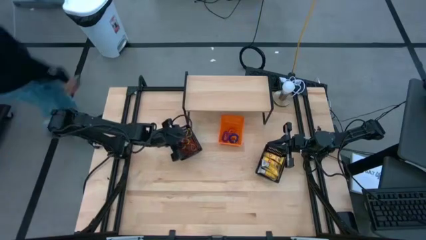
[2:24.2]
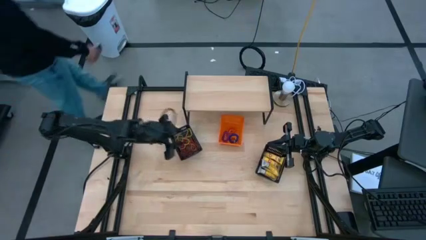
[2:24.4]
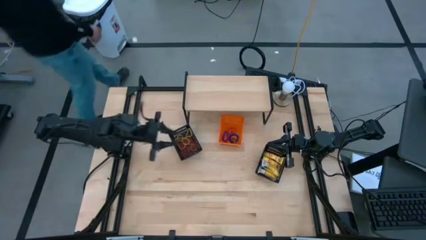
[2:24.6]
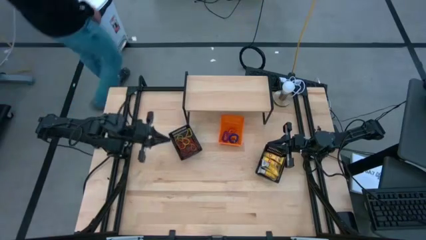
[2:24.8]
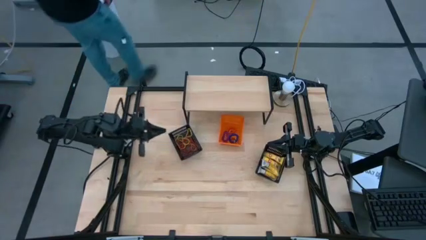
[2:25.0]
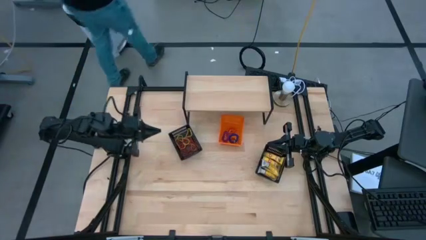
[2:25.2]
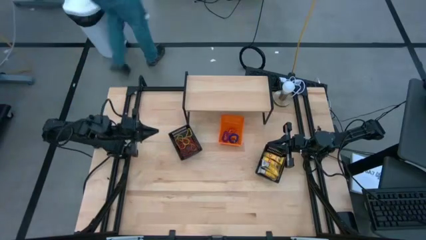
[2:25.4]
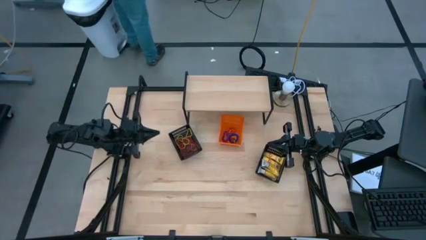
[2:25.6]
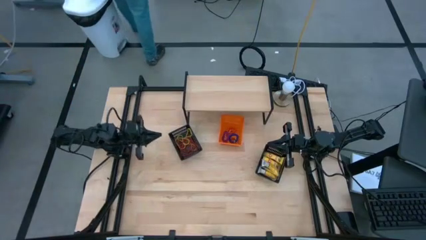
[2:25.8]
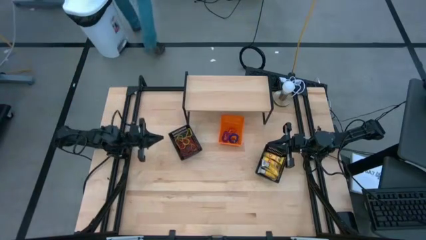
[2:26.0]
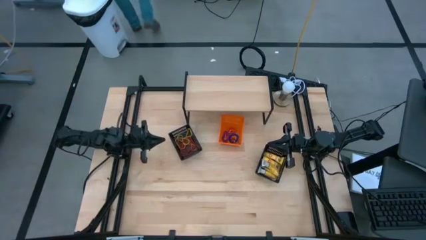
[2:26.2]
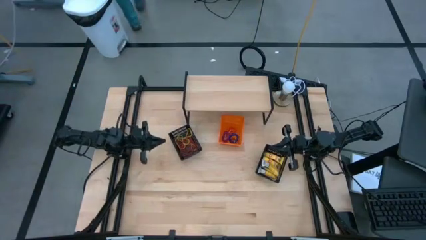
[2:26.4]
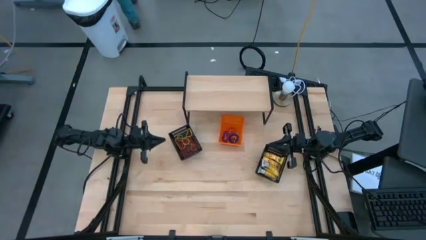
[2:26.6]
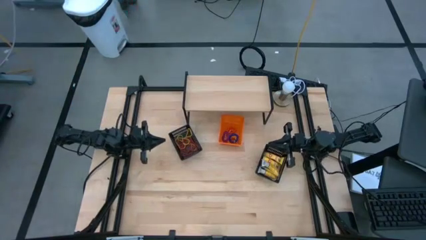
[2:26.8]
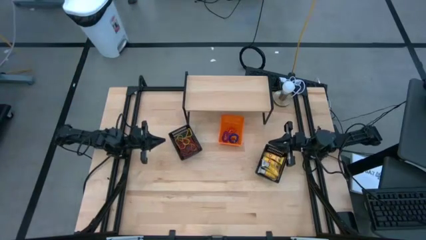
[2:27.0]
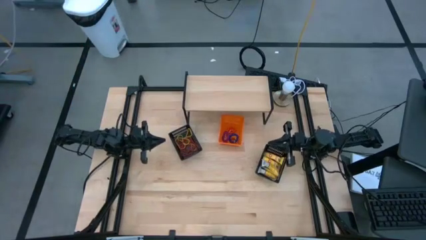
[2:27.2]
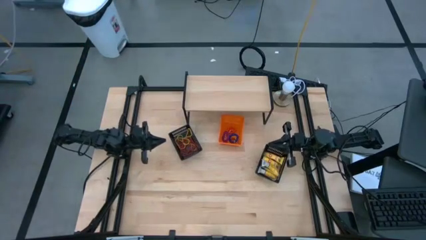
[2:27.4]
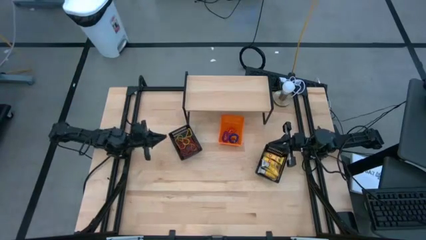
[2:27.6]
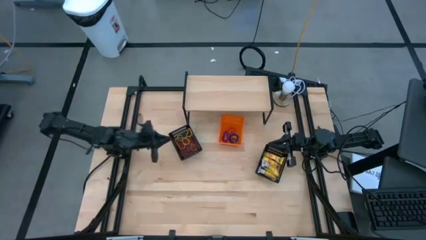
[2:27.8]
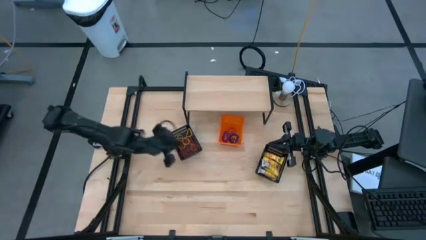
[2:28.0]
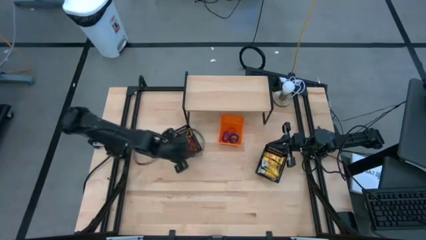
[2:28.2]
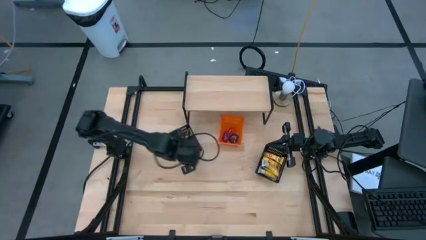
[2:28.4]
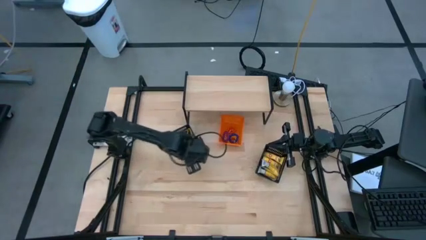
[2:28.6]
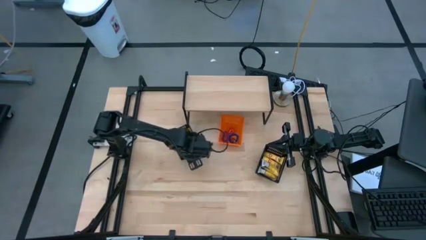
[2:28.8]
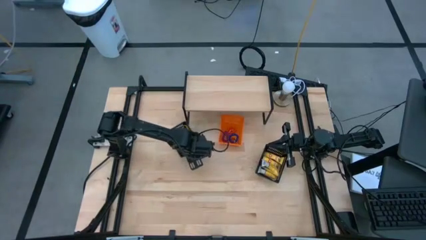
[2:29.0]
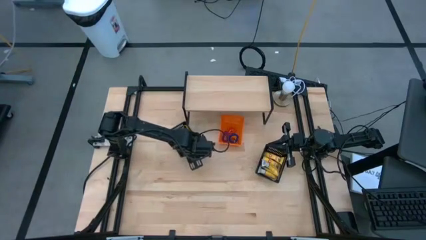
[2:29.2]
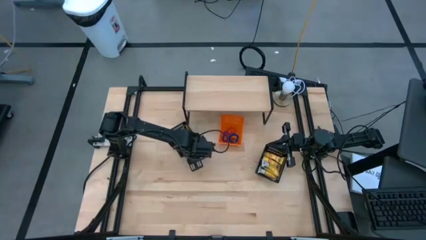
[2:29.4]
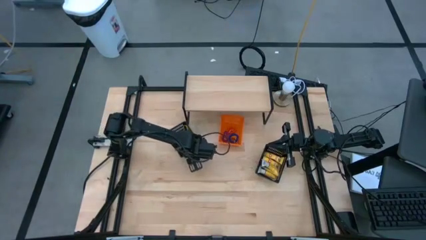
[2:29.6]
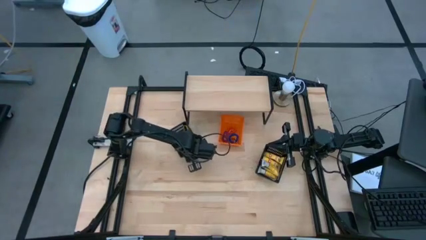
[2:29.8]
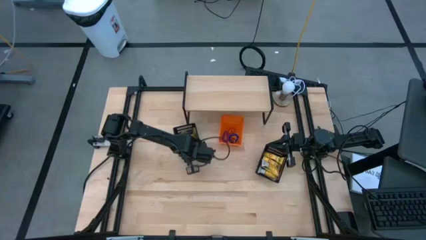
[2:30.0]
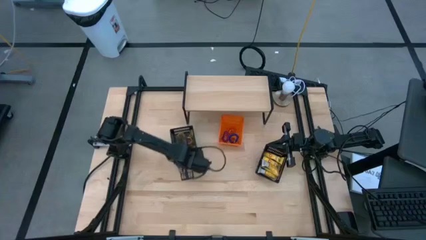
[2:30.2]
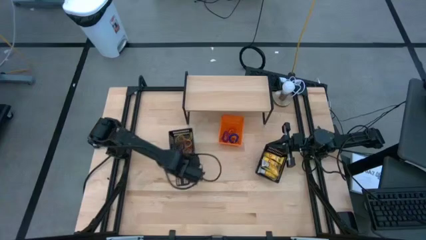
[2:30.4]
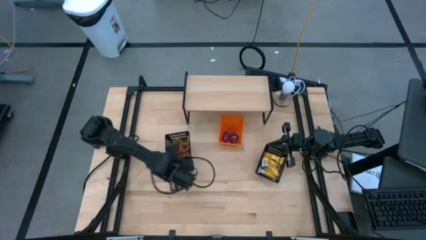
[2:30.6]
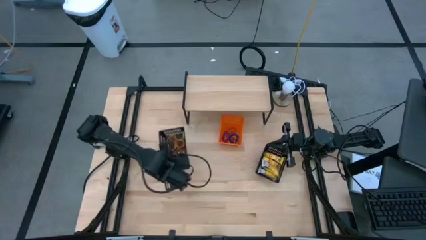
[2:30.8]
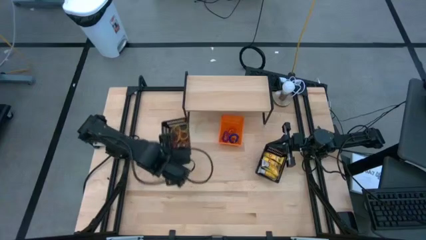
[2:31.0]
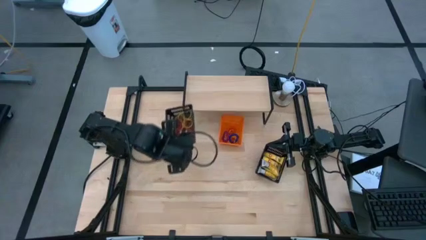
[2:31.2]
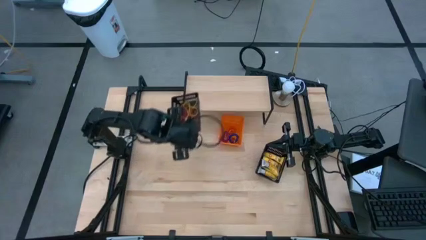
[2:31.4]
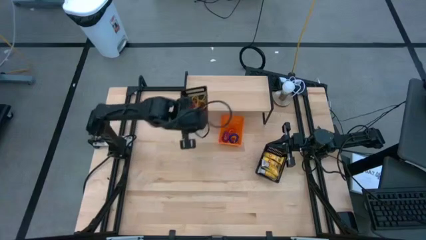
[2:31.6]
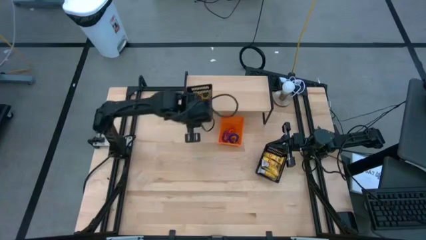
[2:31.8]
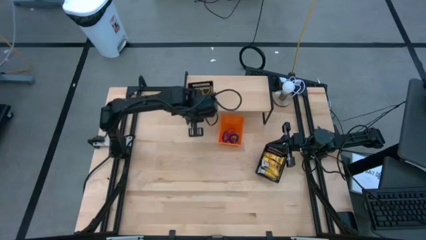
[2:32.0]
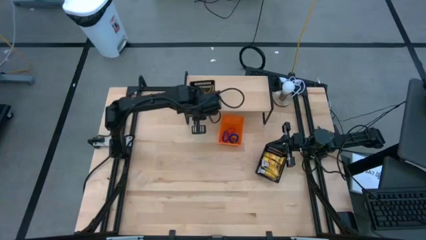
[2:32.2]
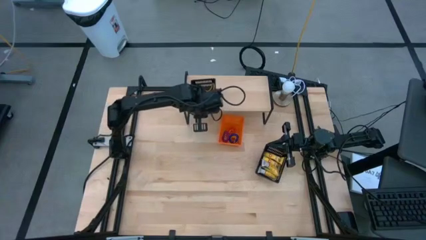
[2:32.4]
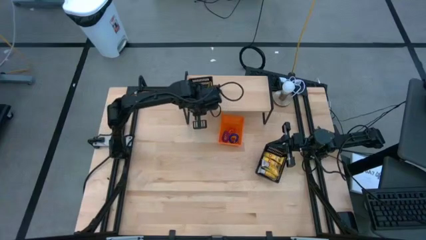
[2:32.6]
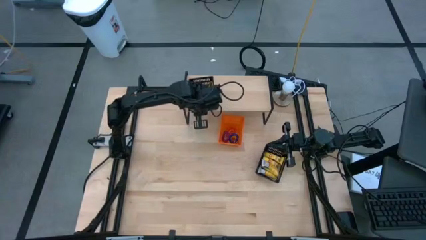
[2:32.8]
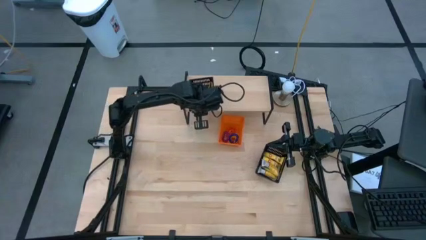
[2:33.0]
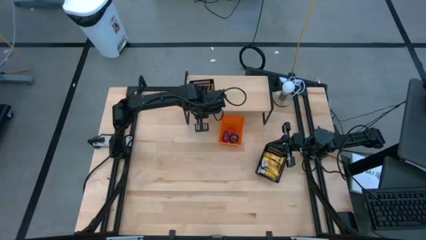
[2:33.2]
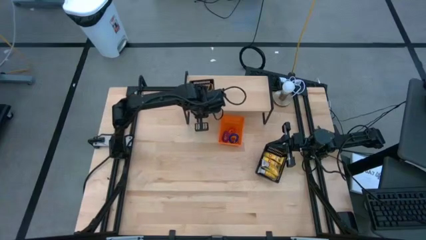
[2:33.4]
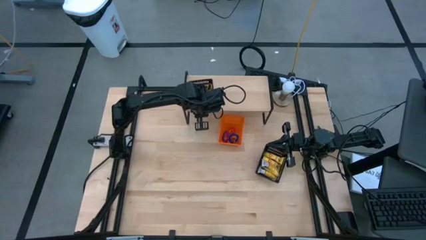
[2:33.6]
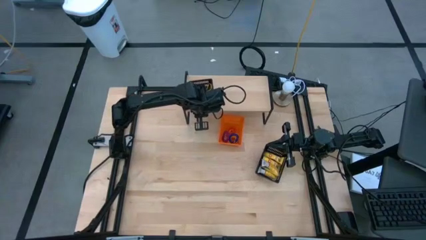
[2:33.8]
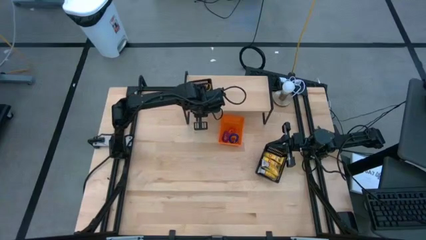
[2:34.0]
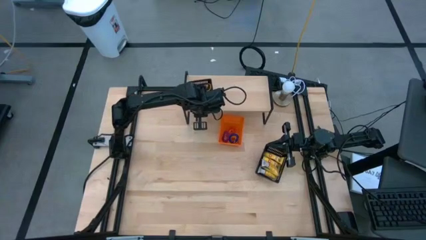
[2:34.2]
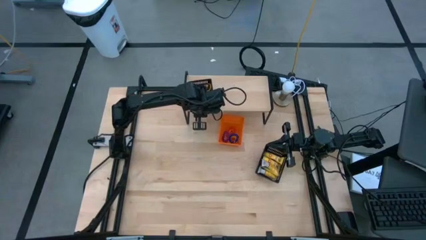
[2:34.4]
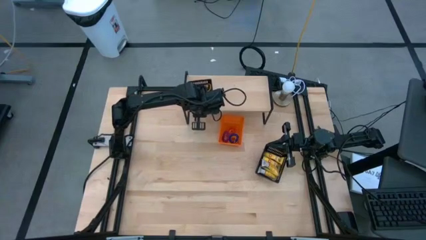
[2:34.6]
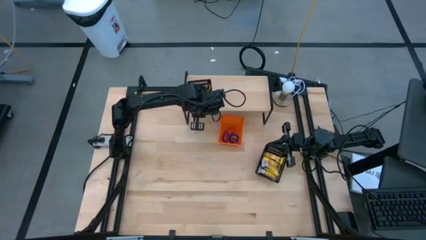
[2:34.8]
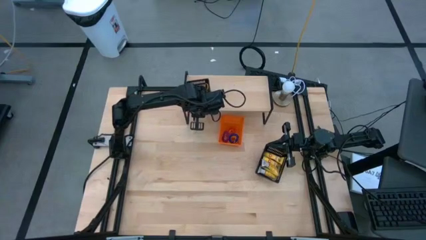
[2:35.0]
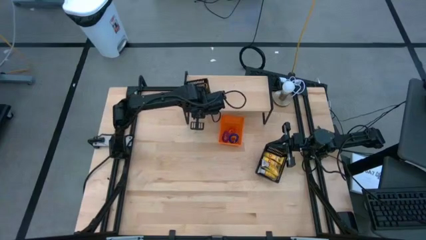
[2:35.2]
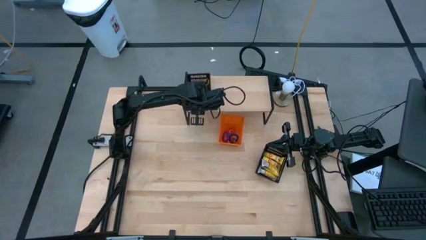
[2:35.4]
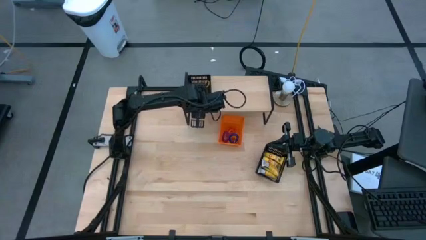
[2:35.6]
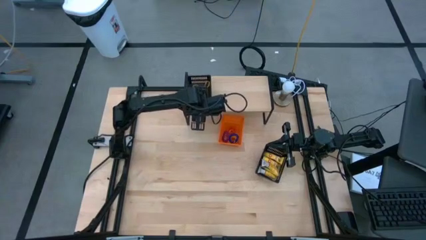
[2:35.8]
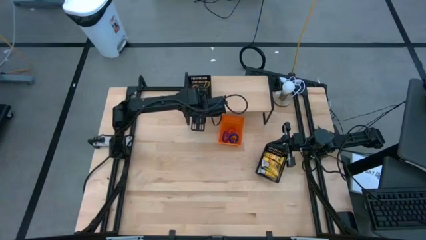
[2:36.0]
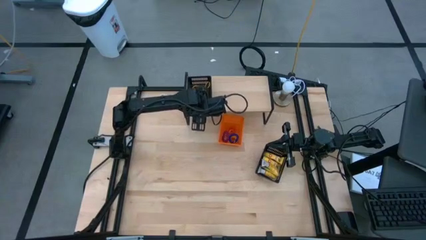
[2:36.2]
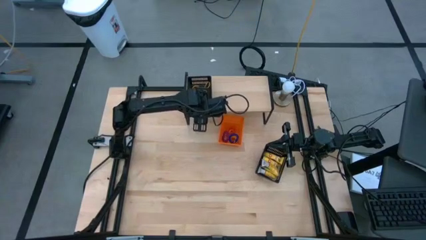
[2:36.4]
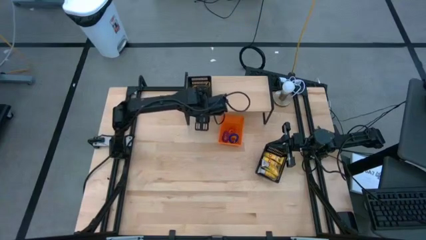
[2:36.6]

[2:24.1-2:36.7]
Task: Pick & Place Office Desk Supplies
Put the left black bin on the shelf
